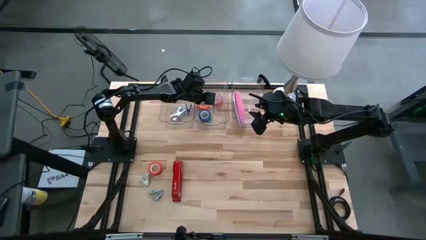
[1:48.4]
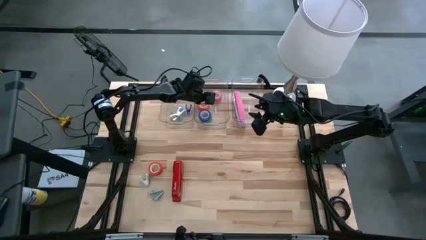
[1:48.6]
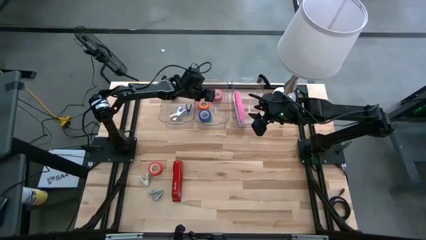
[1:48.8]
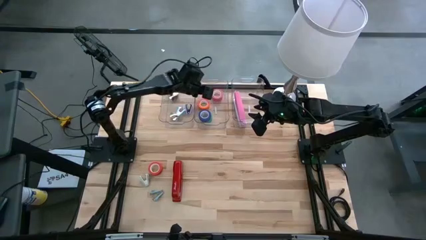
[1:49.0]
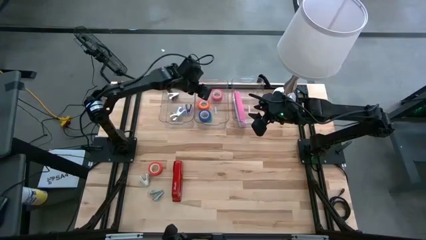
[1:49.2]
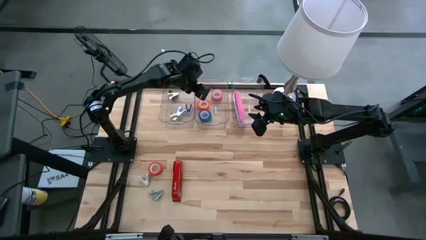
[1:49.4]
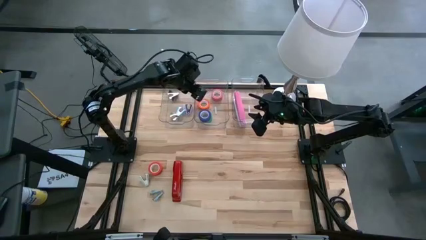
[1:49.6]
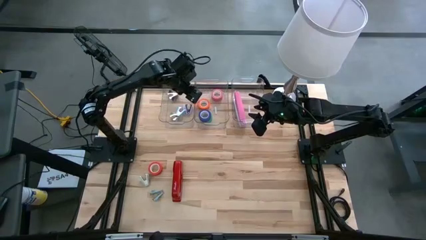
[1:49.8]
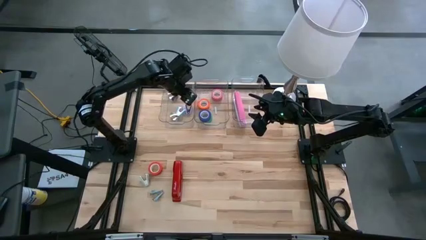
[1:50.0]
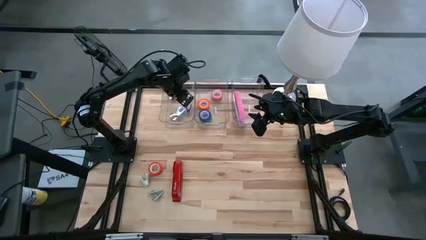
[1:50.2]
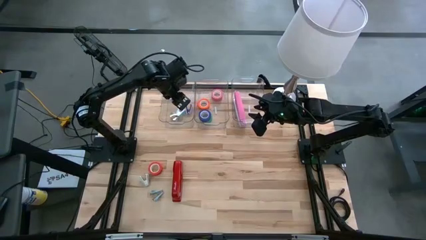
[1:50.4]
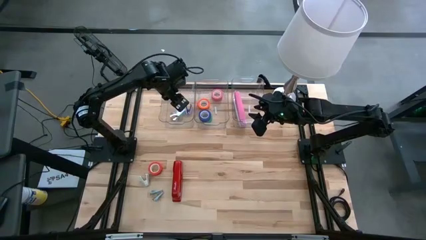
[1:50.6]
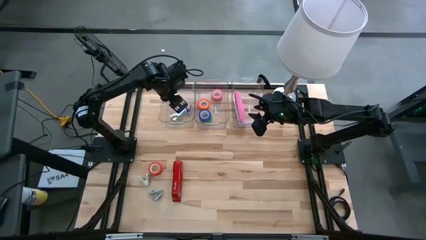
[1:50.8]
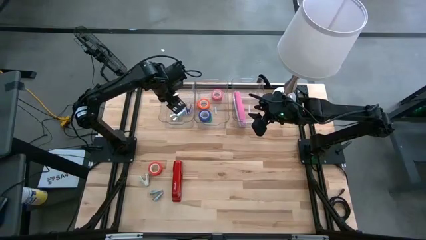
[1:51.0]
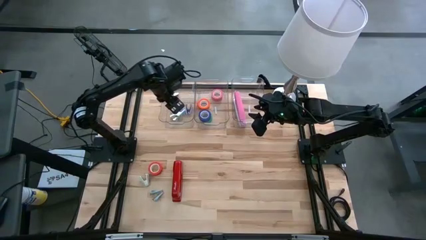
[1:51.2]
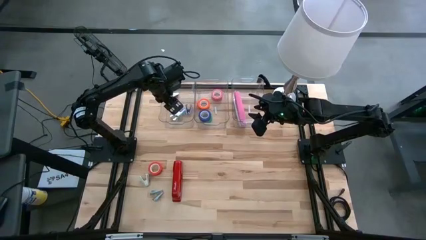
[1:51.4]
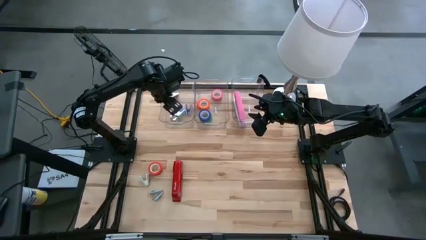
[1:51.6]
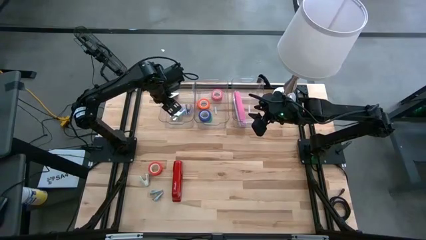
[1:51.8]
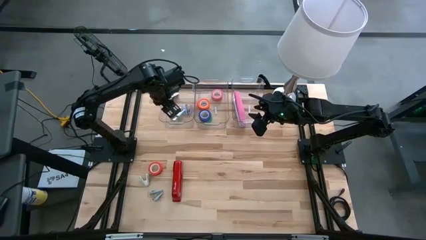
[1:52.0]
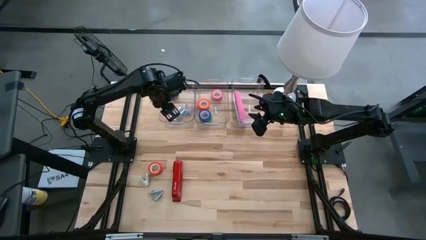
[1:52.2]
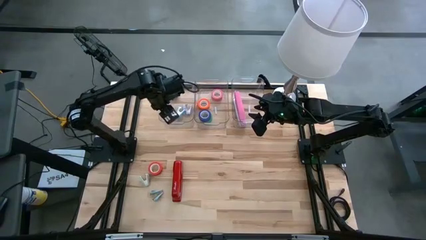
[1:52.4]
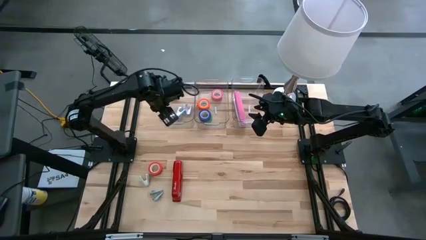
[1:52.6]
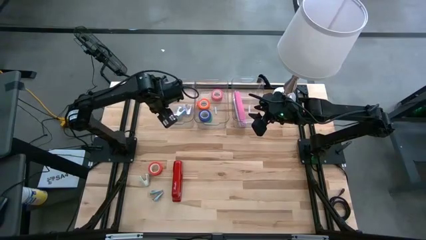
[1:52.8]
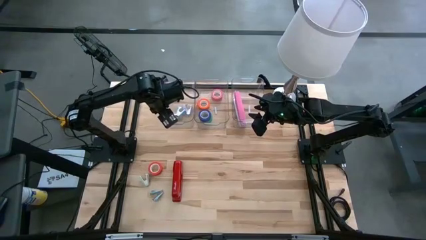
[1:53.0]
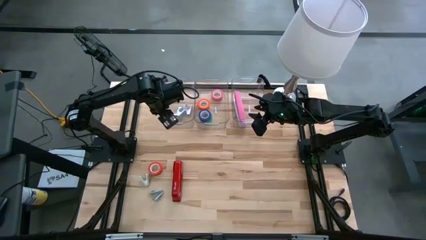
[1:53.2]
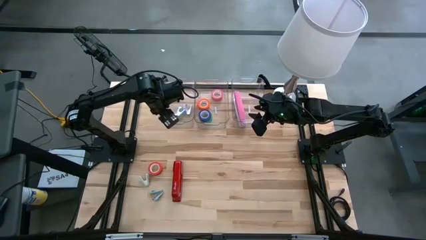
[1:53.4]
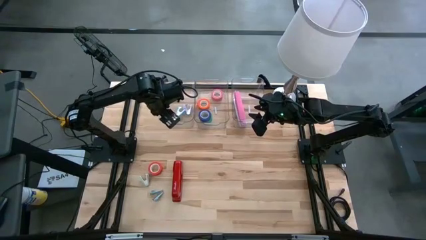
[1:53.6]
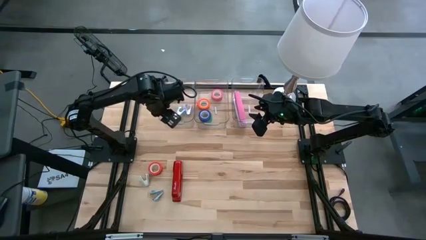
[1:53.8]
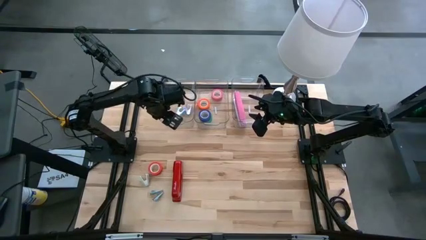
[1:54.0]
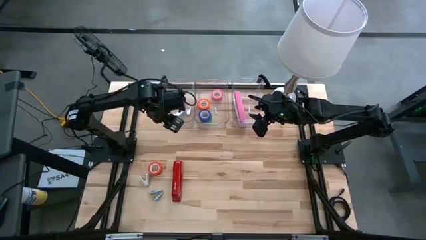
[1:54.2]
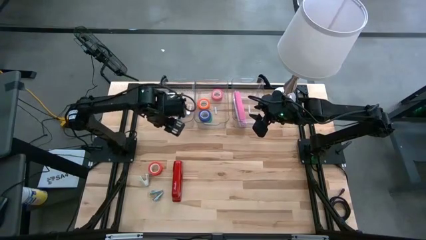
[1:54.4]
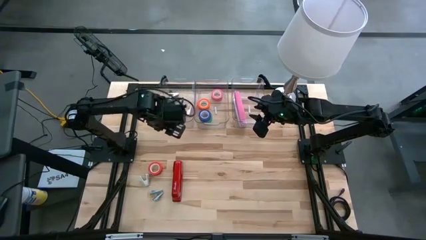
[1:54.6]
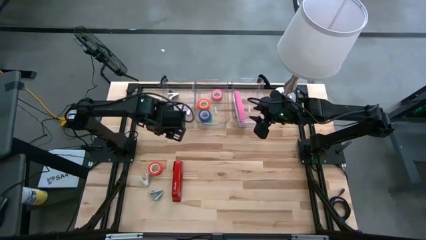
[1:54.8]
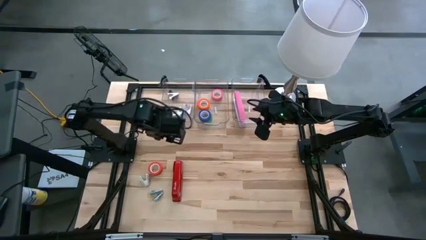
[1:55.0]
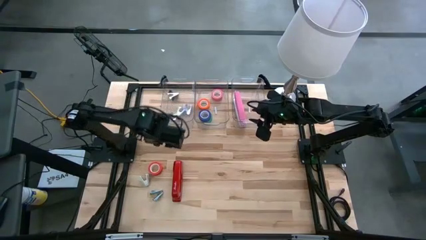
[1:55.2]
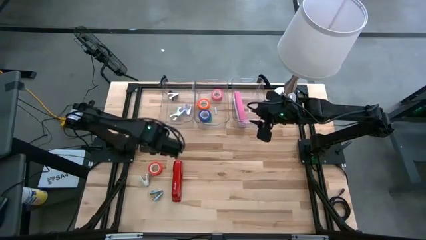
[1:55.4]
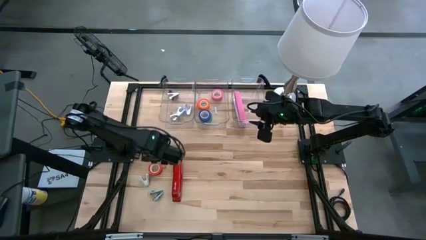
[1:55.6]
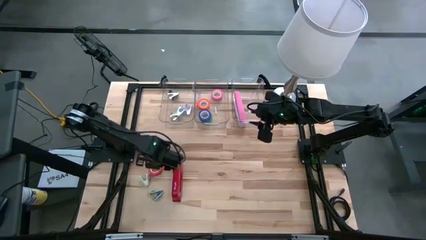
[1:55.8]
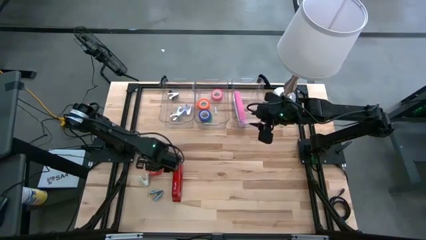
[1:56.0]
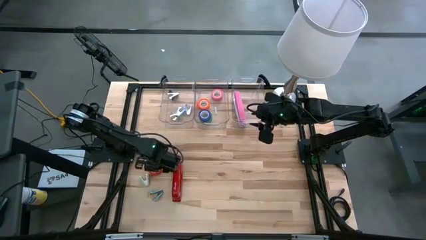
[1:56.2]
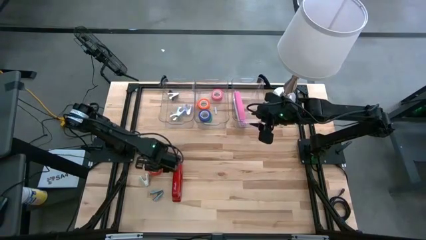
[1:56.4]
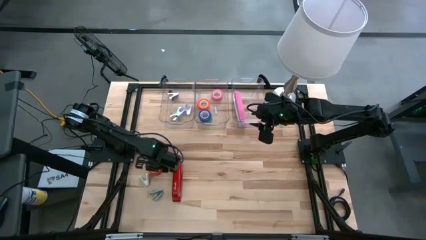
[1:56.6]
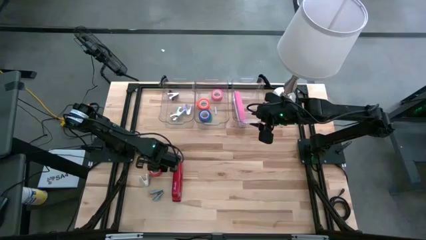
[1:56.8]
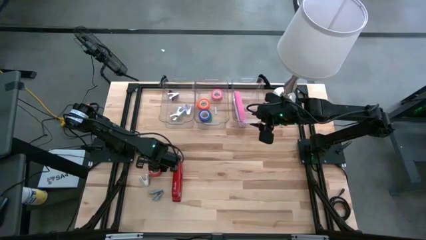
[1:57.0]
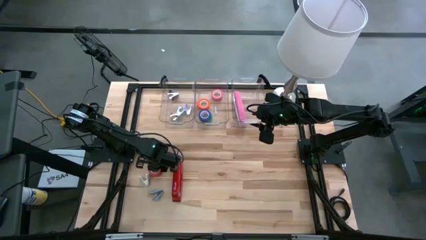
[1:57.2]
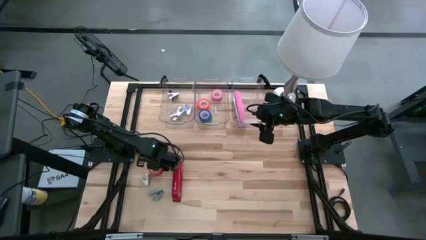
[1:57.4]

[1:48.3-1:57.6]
Task: Pick and place Stapler, Stapler remover, tape
Put the red tape into the middle transparent bin

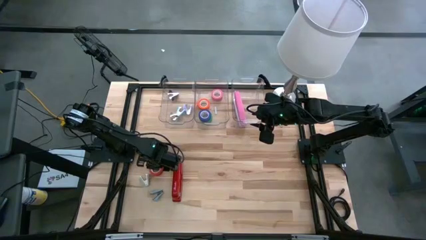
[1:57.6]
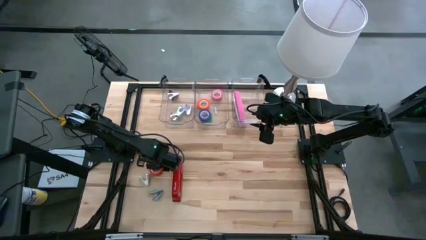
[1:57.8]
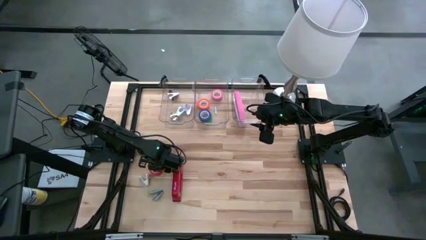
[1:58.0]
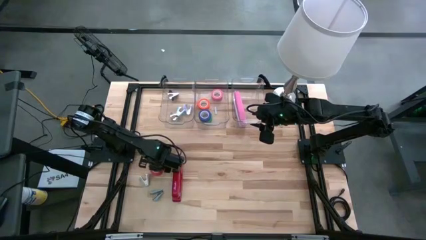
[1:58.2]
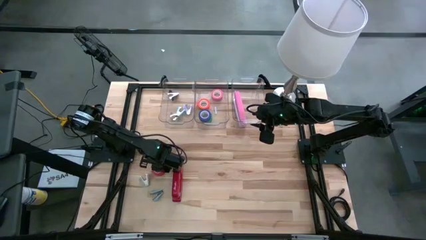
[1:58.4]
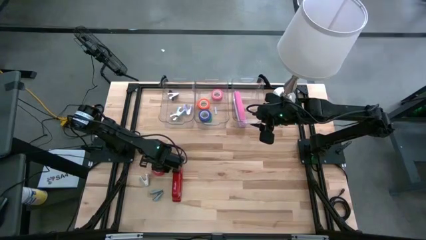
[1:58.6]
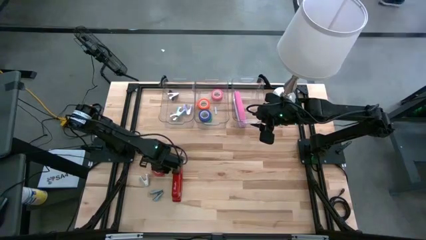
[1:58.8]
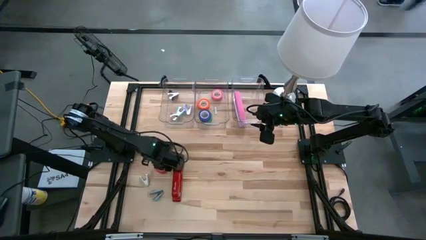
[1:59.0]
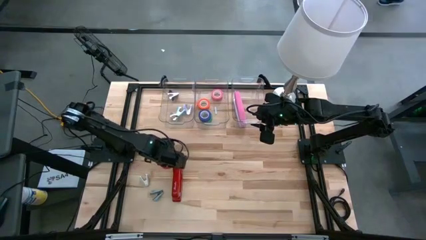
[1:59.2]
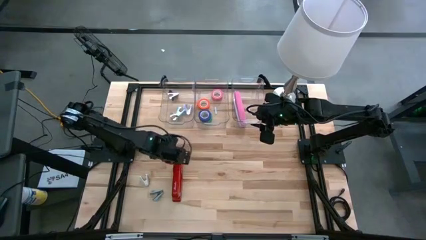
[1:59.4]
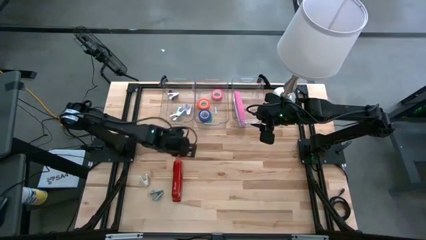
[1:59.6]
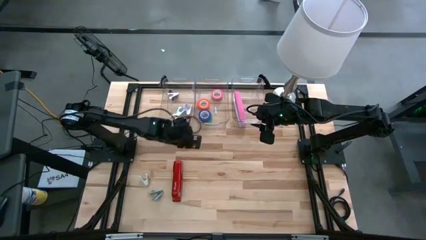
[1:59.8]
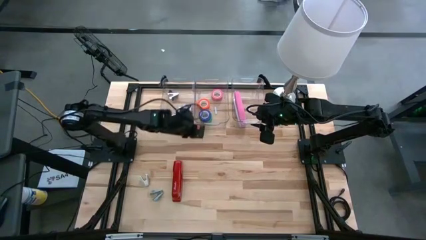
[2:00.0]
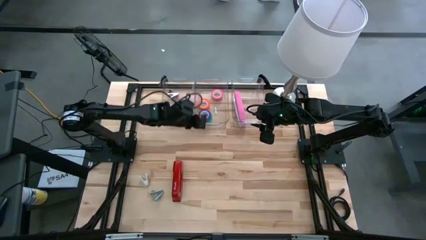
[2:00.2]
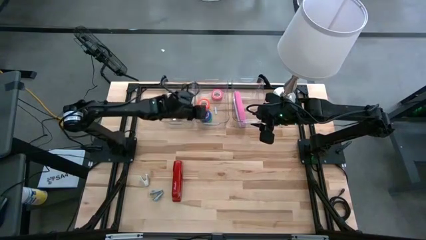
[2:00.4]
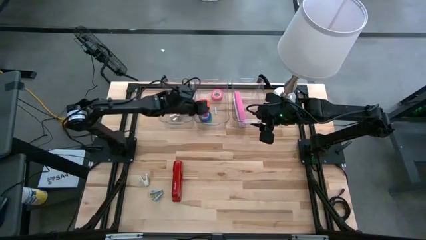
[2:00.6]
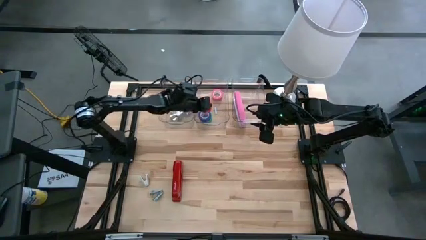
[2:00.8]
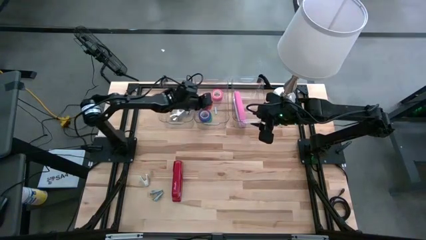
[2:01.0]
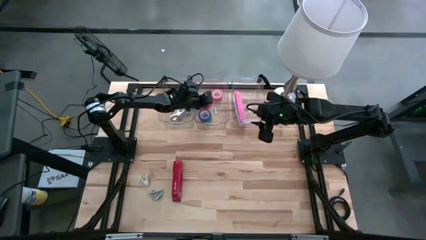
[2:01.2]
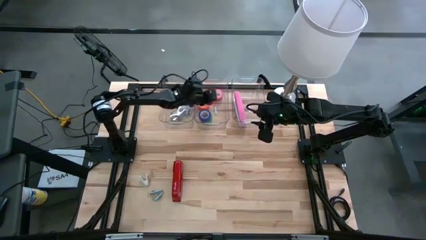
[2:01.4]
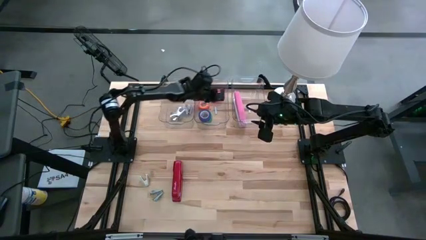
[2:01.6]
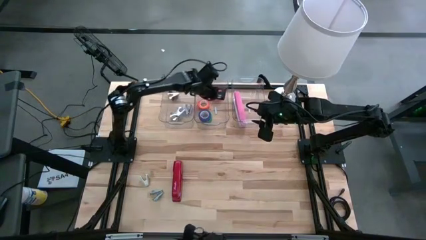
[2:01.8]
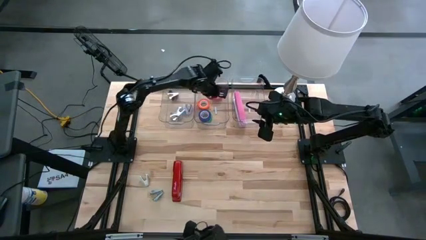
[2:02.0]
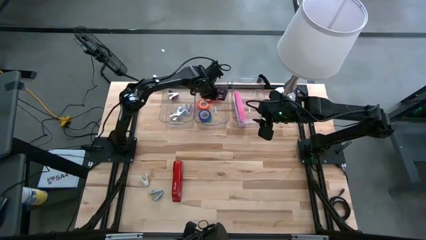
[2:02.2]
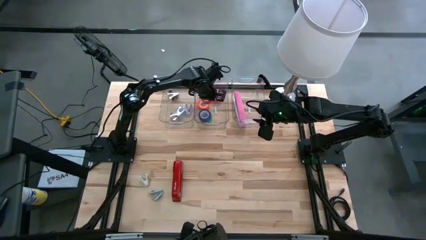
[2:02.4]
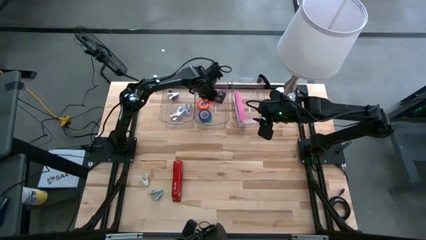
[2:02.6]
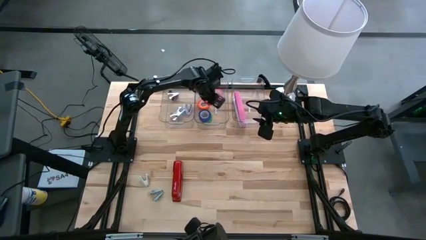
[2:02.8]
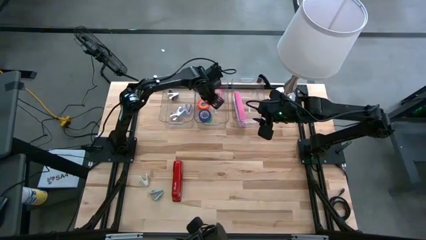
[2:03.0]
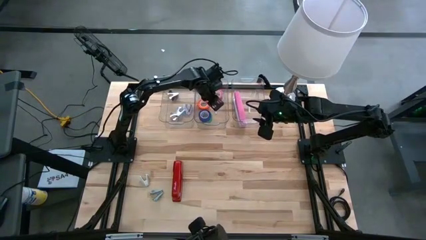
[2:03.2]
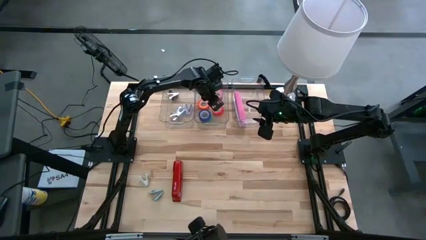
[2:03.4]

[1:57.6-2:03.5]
Put the red tape into the middle transparent bin

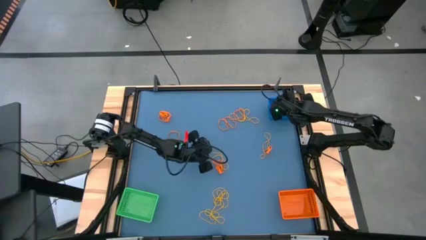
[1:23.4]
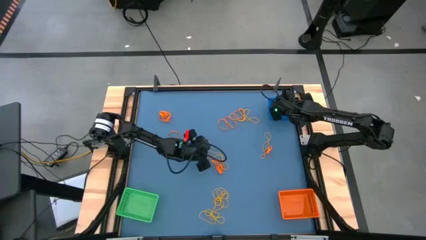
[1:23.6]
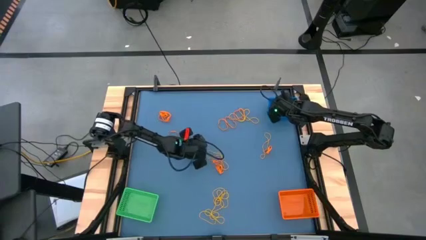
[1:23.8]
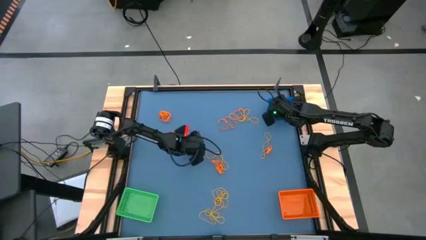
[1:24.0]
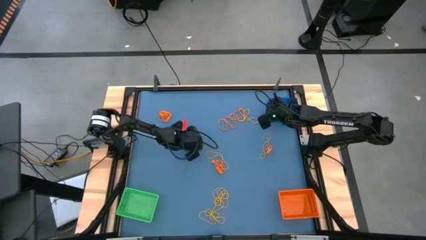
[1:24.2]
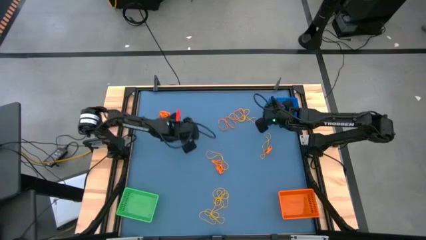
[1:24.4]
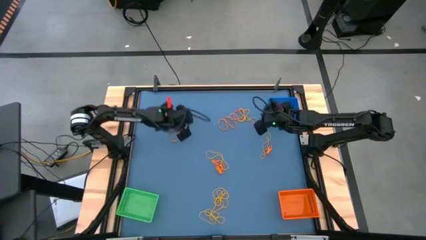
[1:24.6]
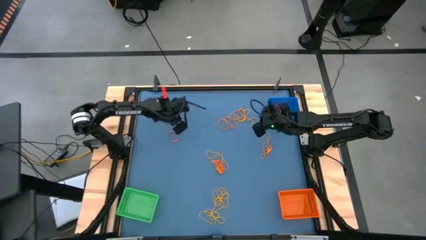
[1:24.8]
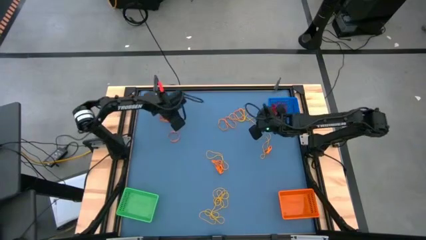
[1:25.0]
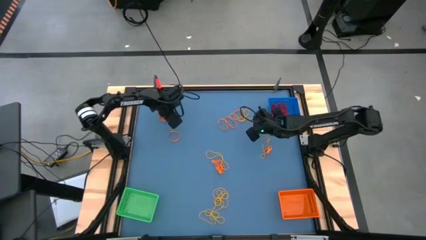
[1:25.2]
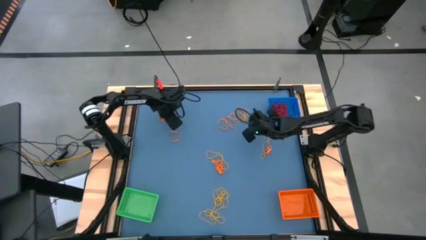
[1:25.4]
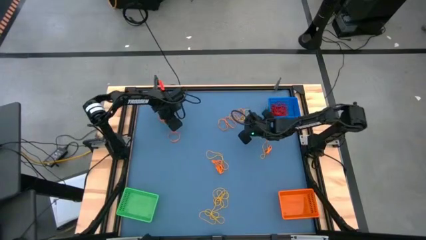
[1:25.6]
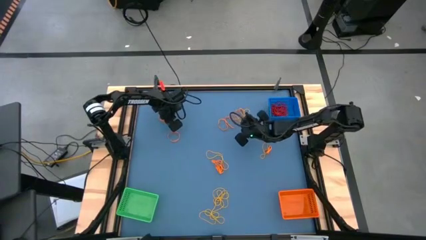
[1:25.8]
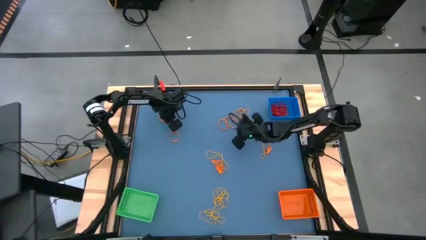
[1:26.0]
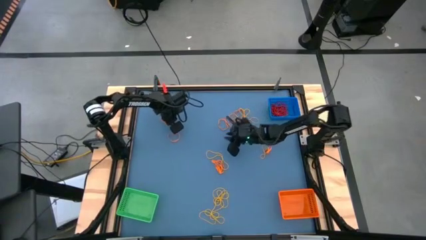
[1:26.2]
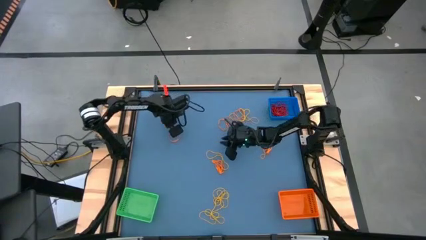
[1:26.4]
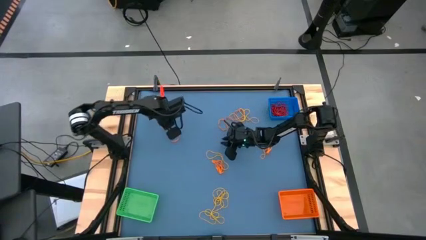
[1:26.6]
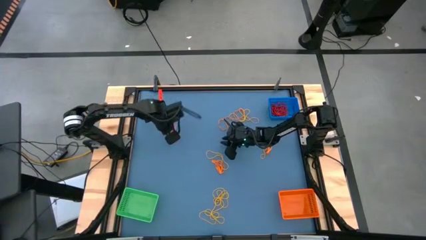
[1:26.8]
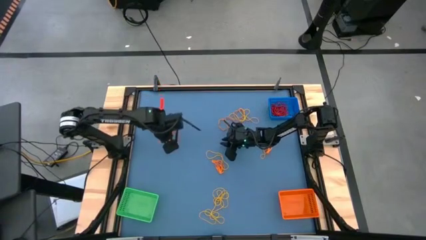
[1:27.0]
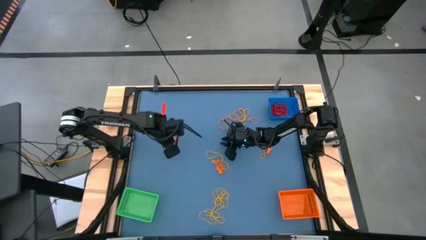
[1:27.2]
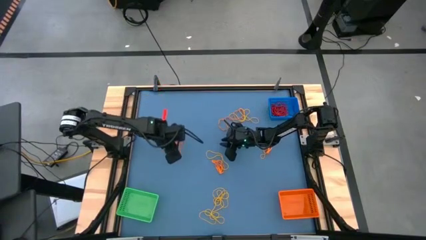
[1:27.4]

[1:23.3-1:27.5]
Task: Sort rubber bands into baskets
Adjust the orange rubber band
